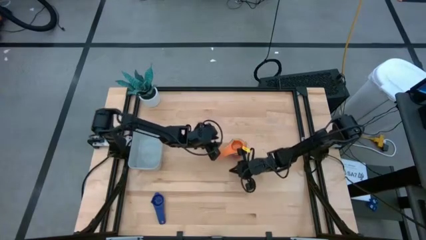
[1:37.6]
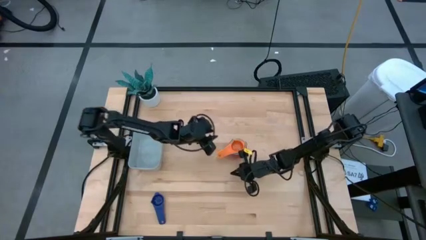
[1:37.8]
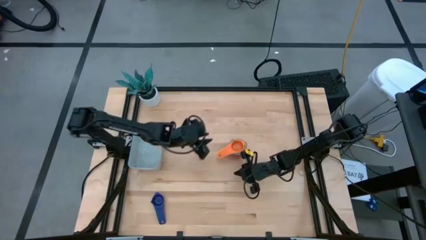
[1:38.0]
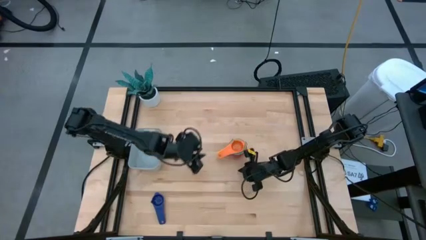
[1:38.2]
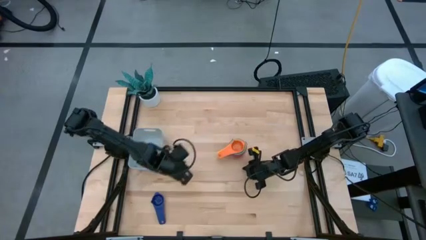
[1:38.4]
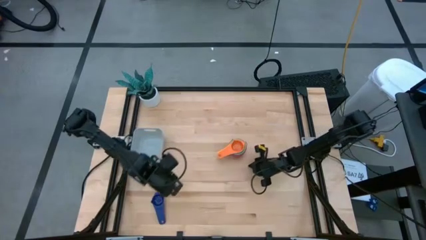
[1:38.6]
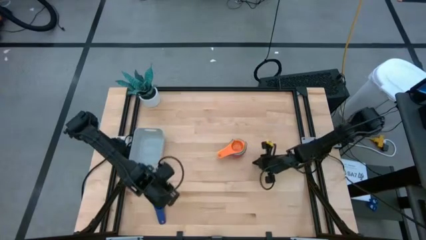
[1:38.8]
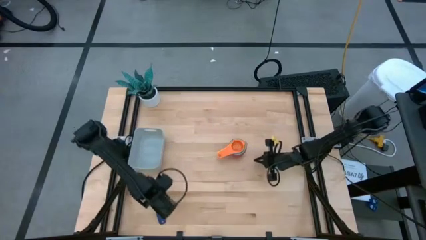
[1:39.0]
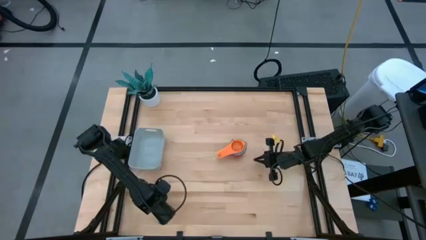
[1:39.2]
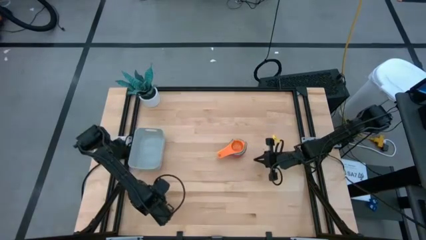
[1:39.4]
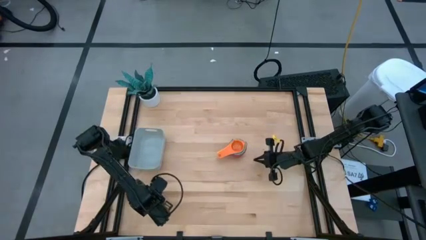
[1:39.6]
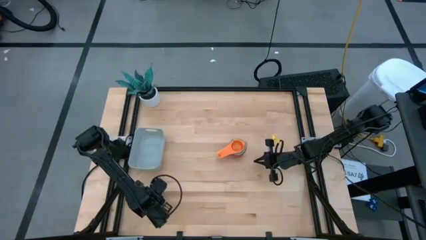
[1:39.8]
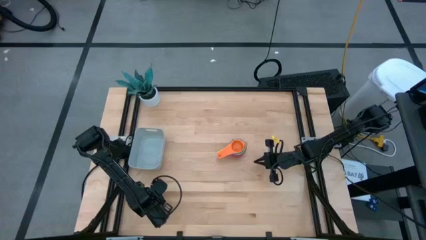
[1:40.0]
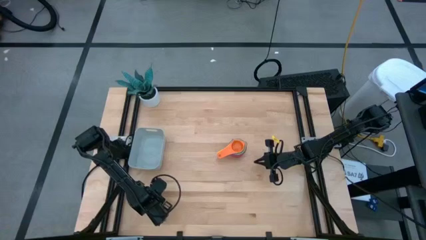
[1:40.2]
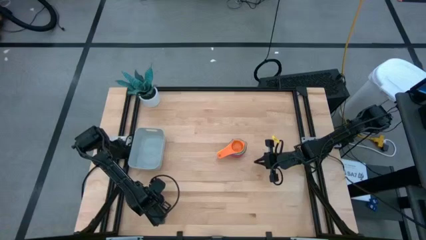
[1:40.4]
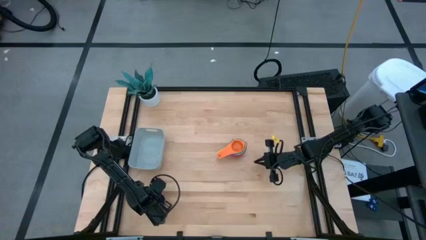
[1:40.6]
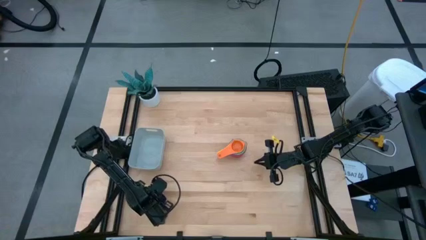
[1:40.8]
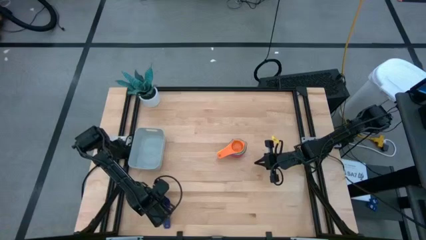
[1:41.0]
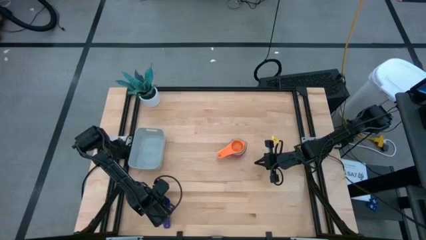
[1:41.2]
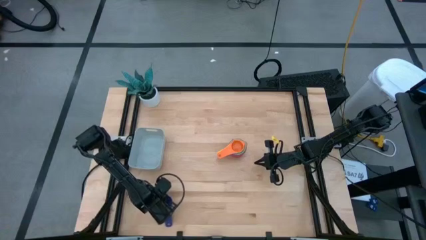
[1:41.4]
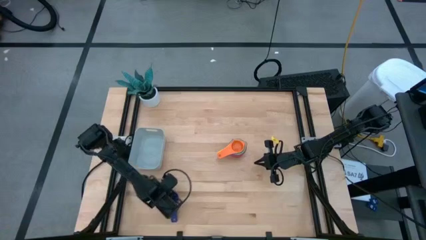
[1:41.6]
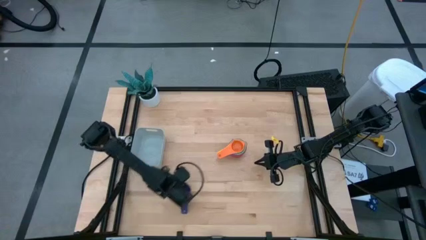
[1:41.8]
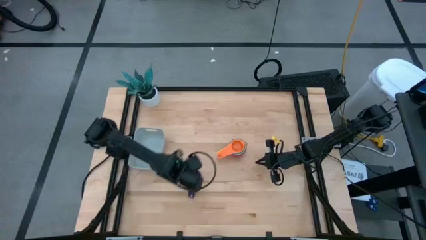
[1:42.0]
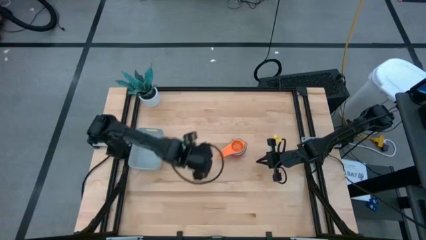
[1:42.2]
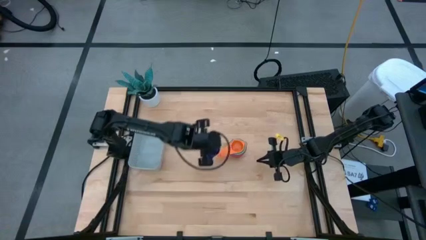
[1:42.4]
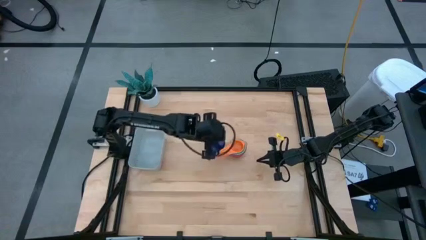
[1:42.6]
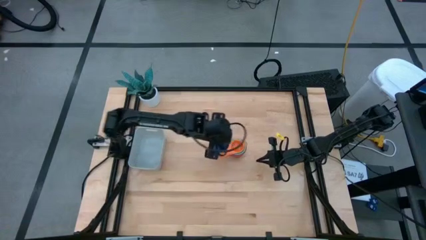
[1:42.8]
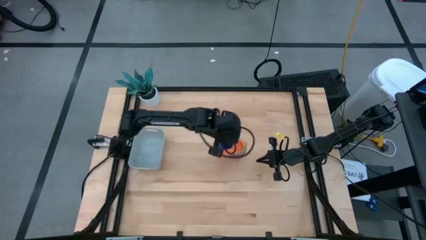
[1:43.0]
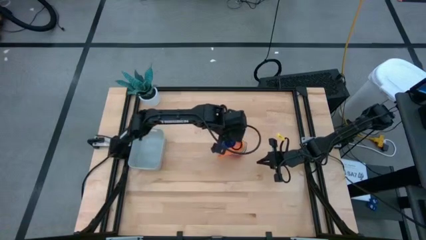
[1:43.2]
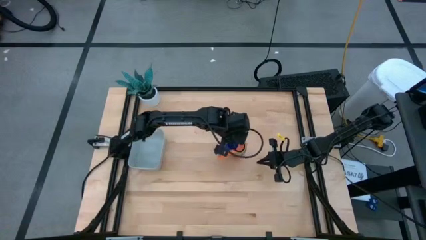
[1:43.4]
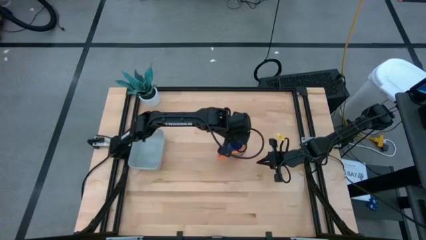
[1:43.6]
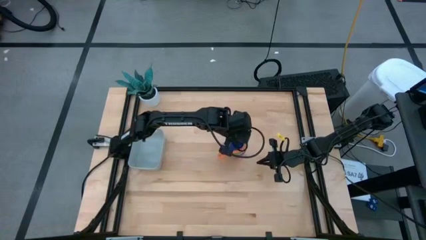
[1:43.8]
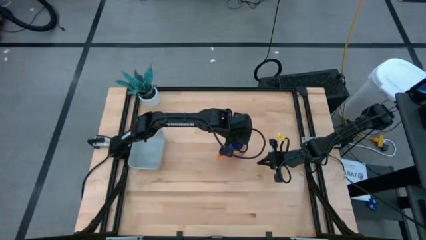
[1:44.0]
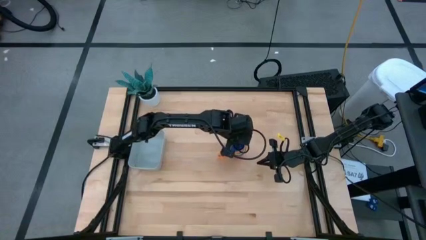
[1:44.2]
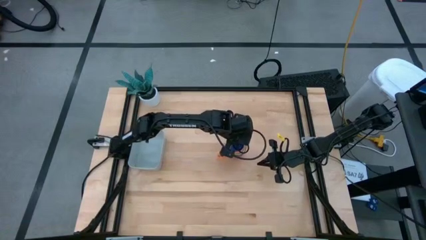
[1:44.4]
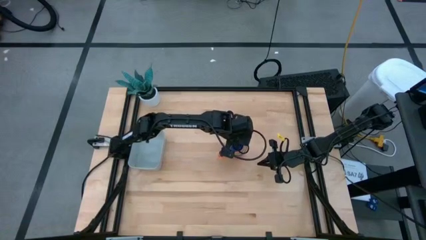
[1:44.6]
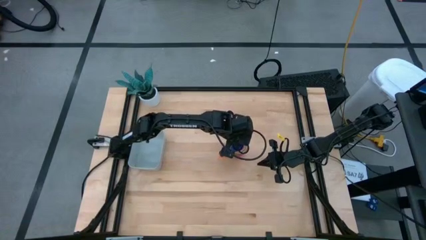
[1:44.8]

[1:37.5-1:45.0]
Task: Nest measuring cups in basket
Stack the dark blue measuring cup on top of the orange measuring cup
